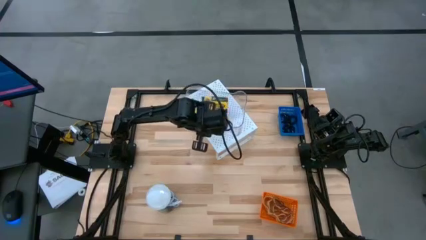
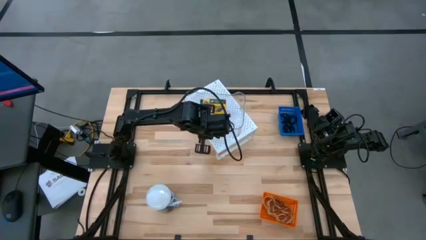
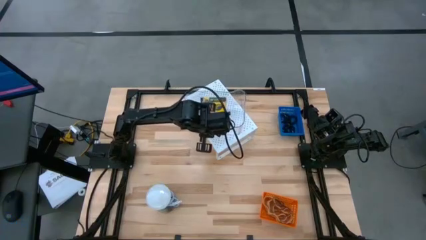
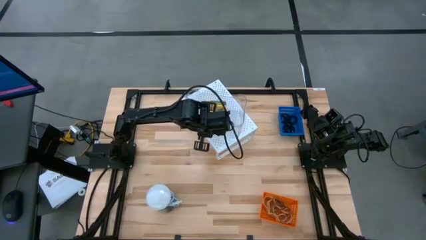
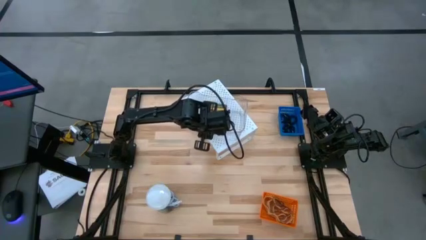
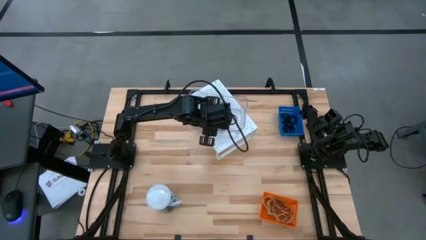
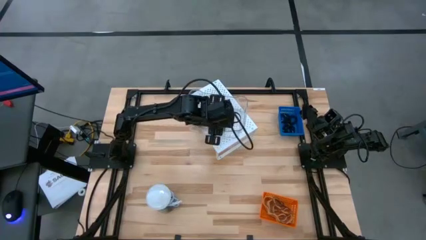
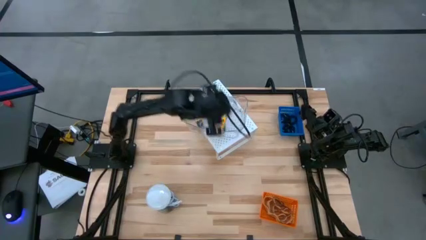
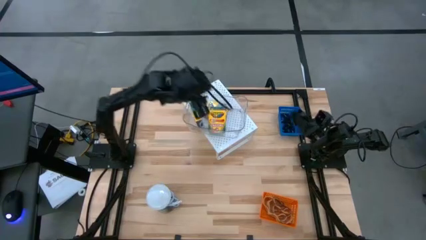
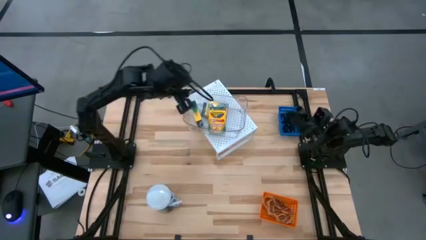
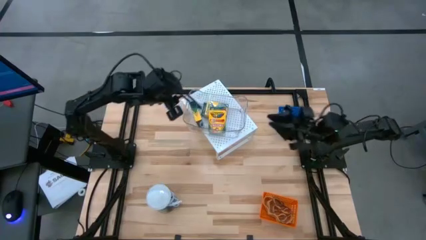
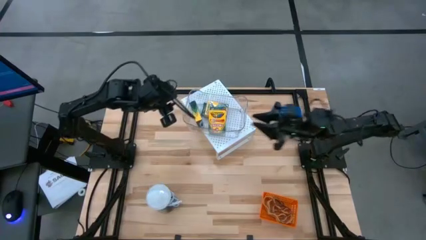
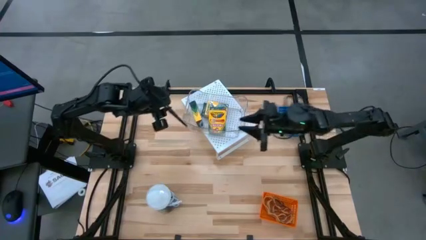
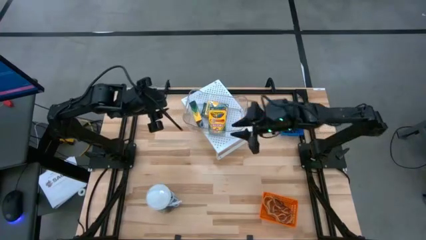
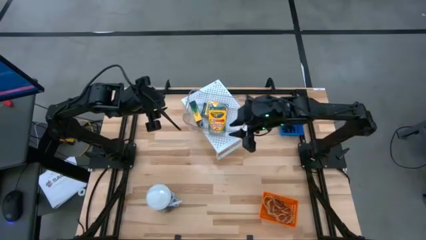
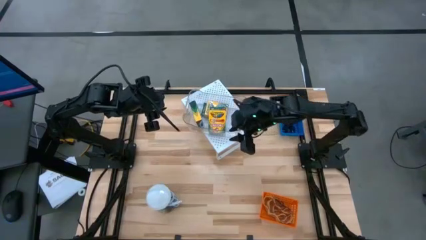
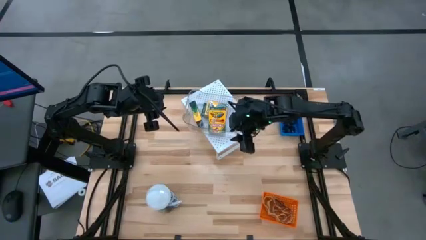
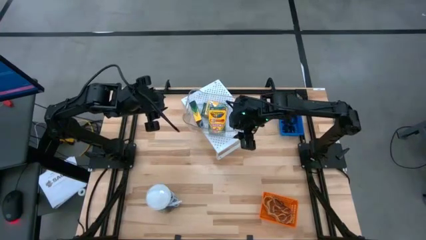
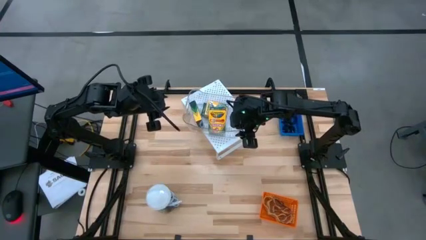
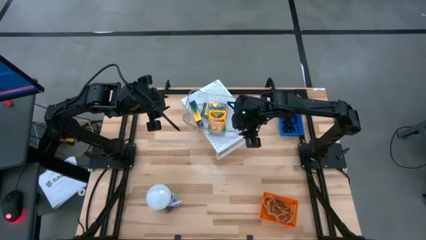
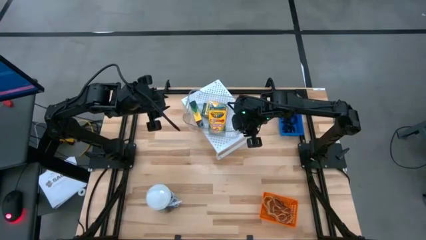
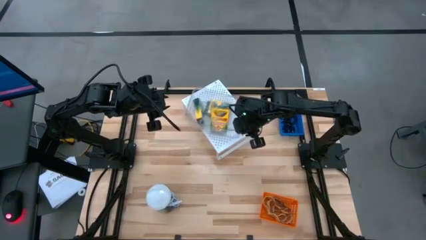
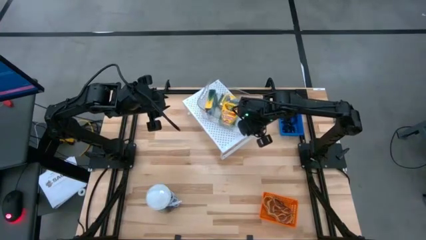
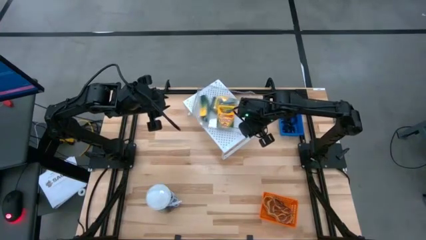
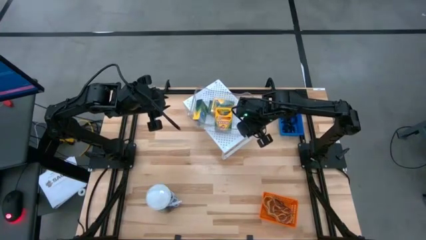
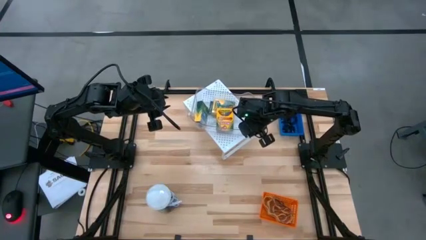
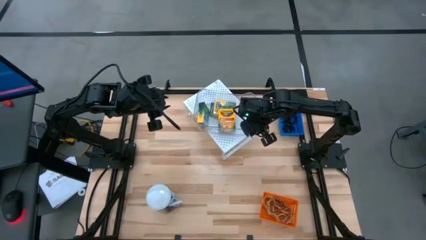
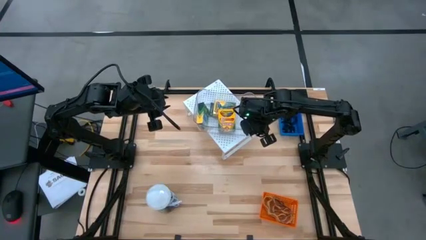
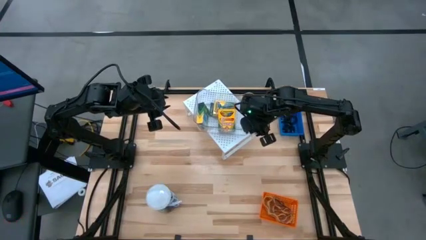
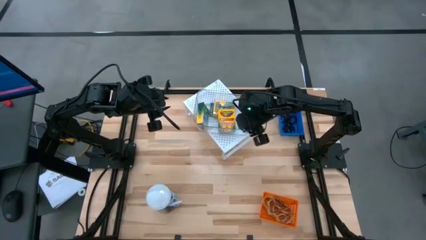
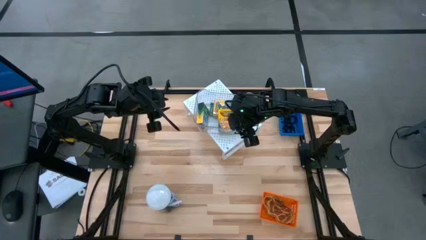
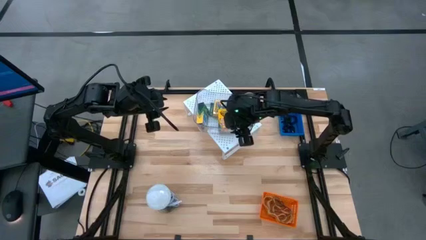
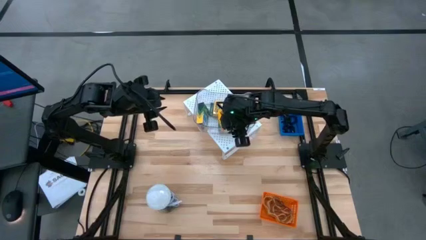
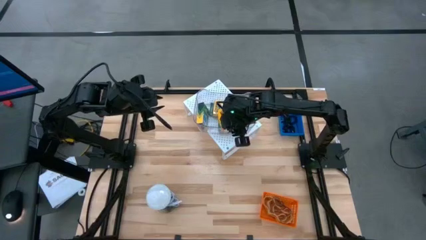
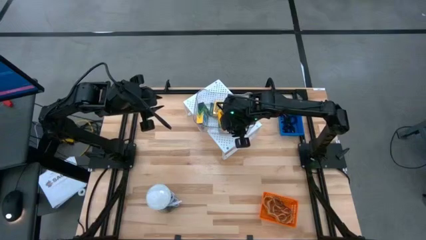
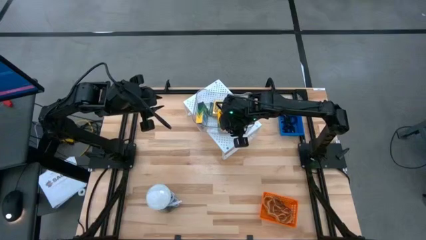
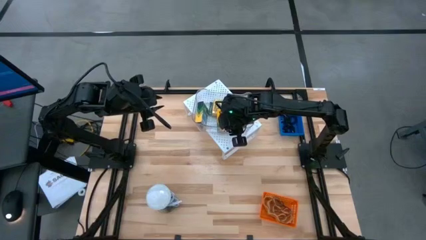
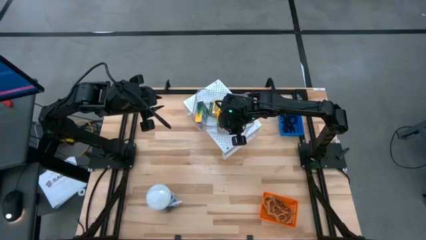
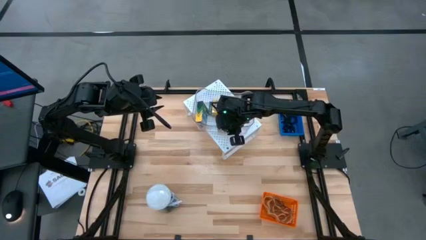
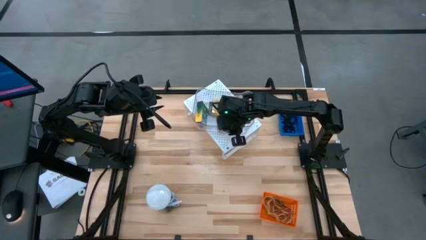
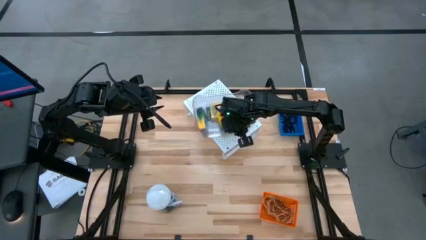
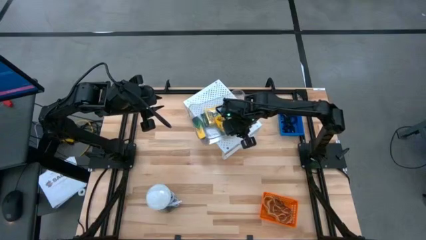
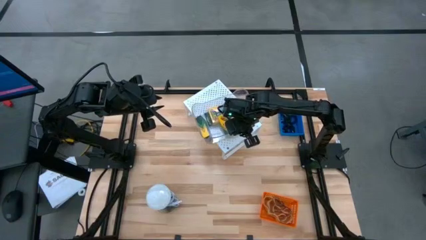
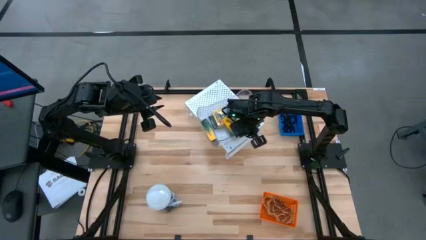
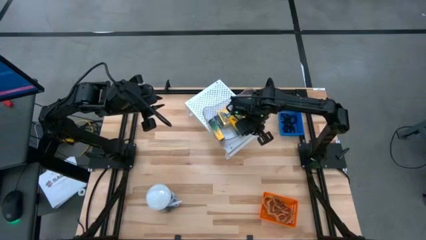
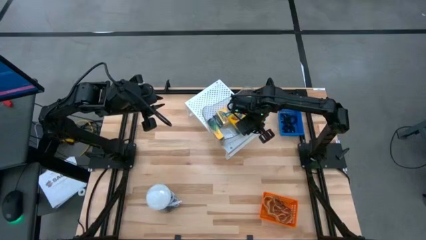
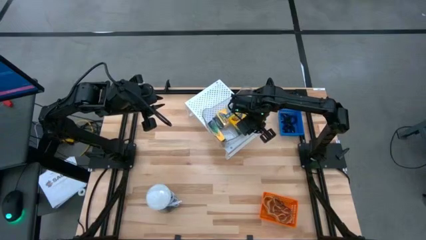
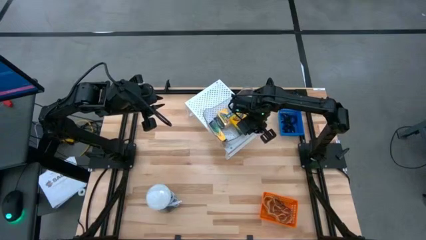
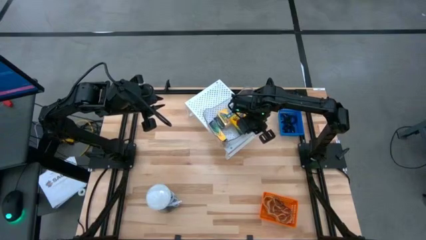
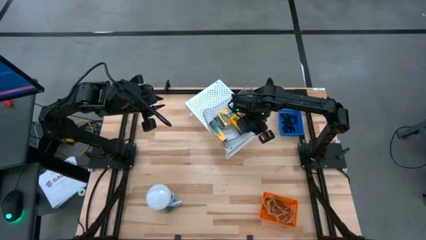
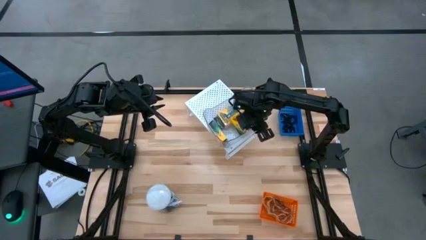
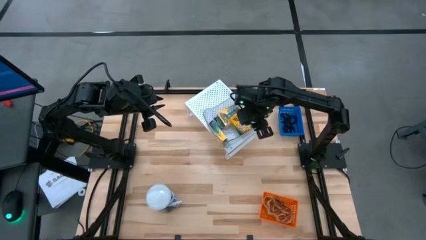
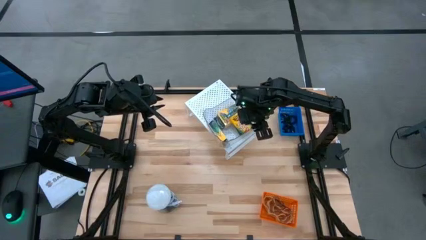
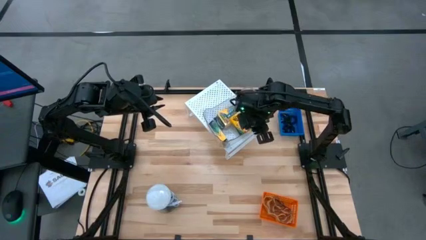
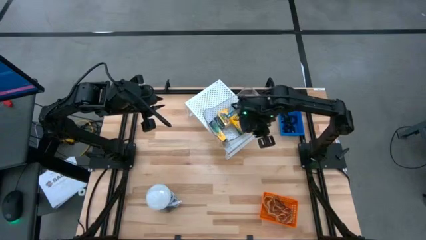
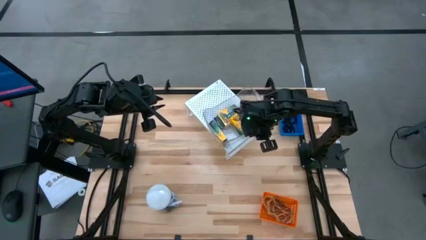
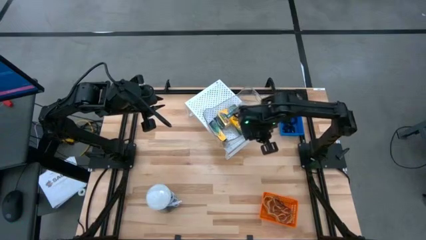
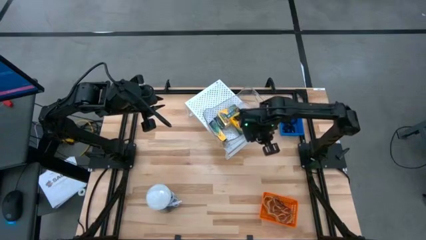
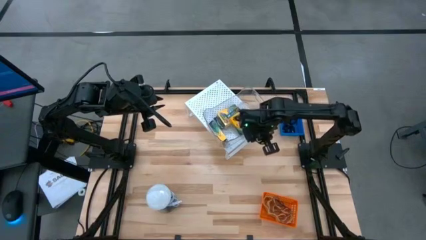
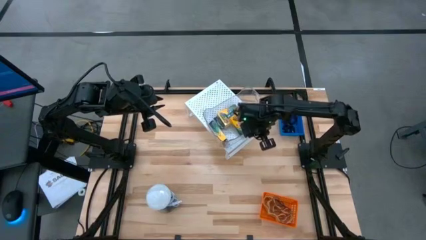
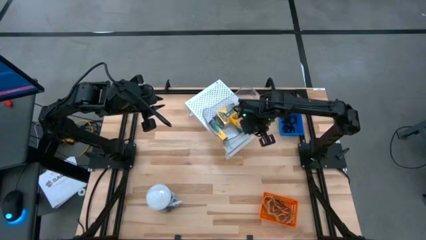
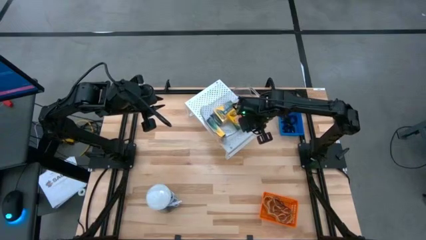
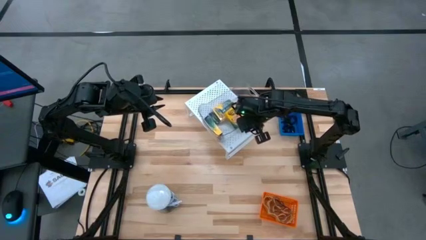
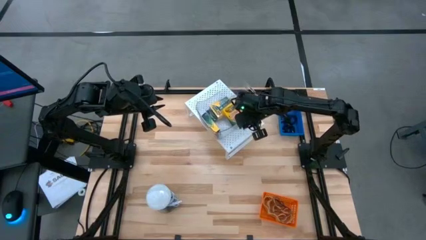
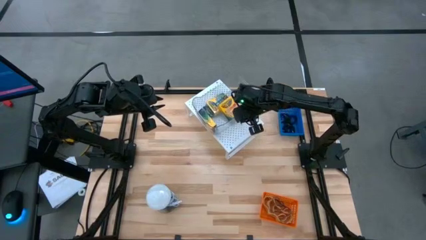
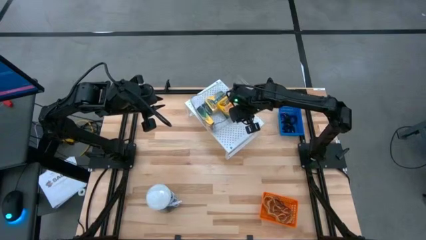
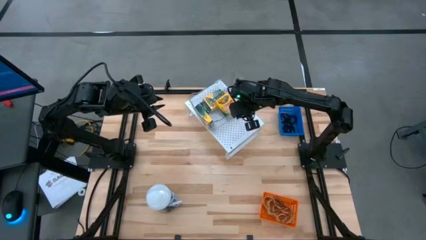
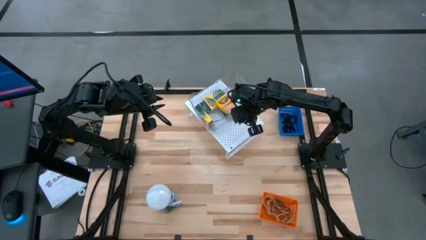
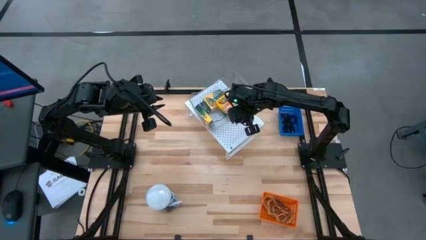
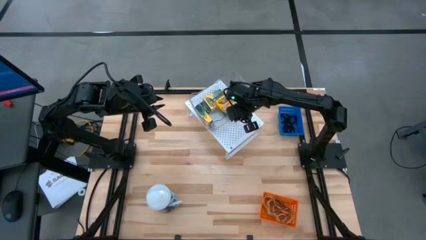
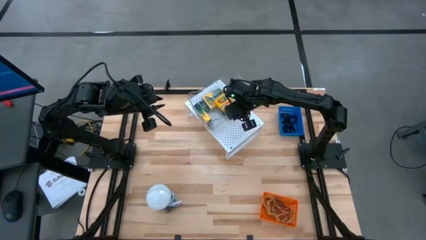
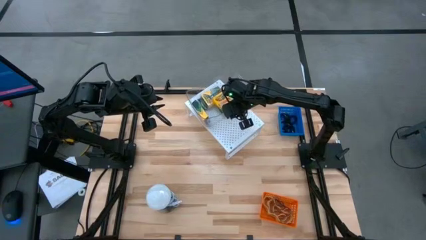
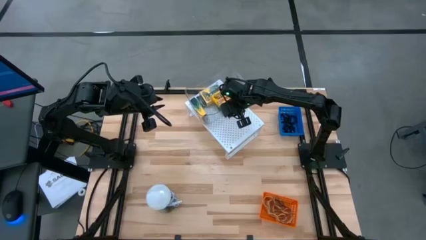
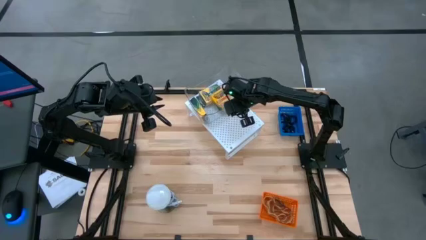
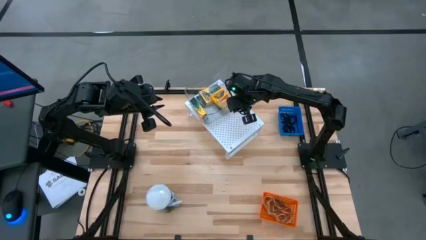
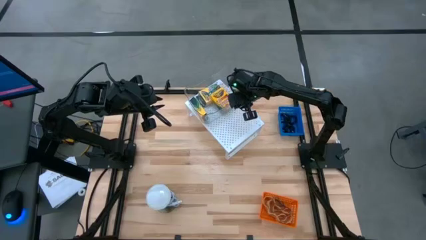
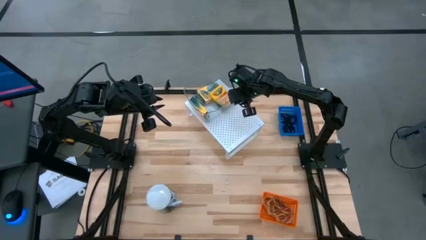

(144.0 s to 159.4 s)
Task: Pick & Place Office Desk Supplies
Put the transparent bin on the shelf
